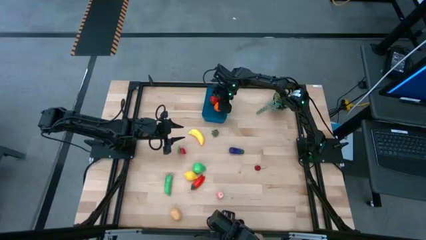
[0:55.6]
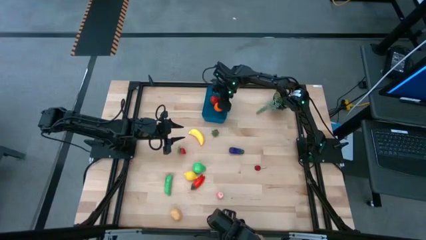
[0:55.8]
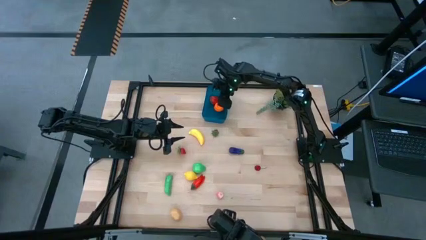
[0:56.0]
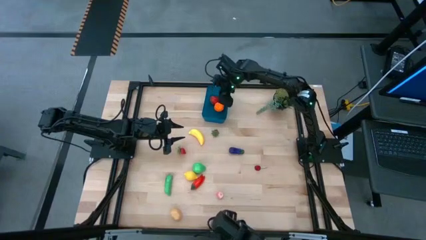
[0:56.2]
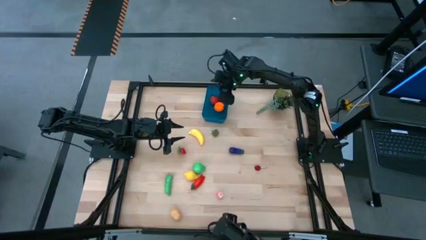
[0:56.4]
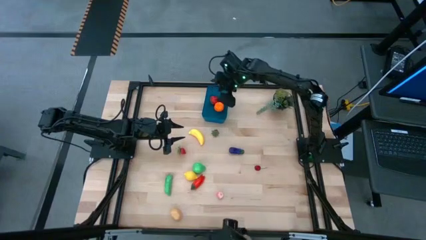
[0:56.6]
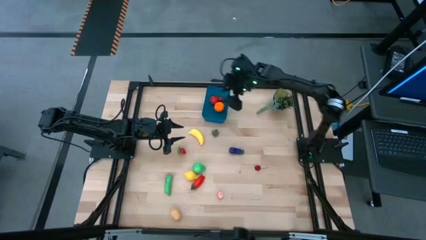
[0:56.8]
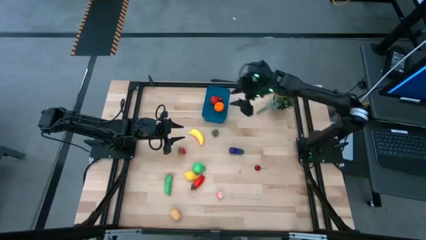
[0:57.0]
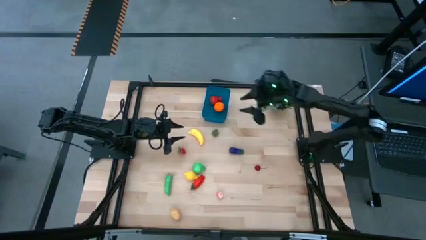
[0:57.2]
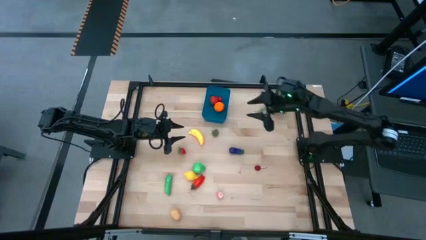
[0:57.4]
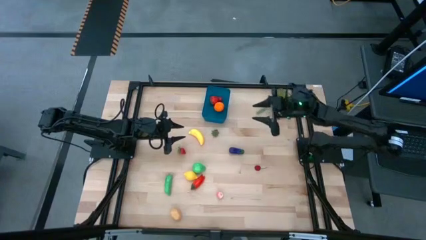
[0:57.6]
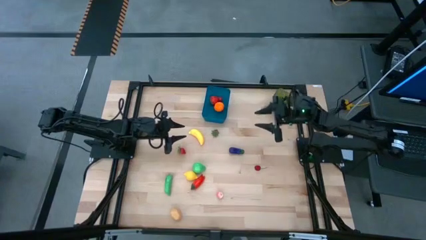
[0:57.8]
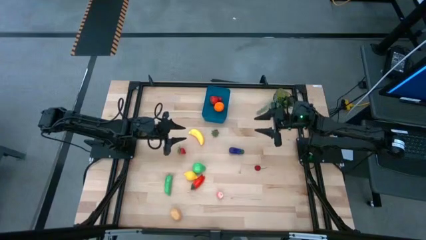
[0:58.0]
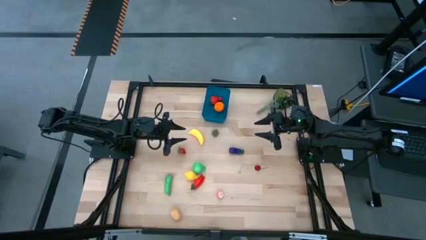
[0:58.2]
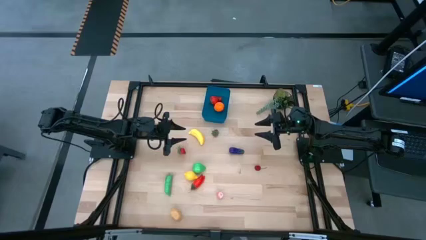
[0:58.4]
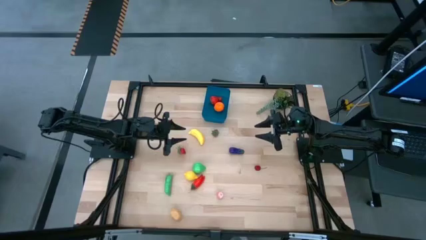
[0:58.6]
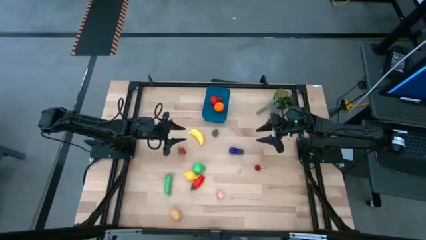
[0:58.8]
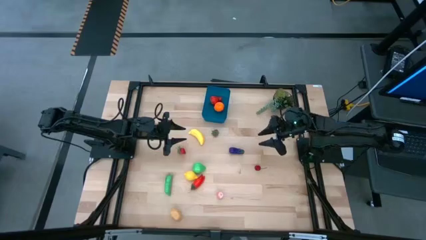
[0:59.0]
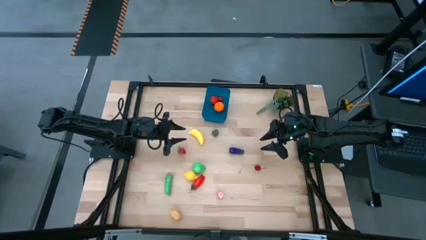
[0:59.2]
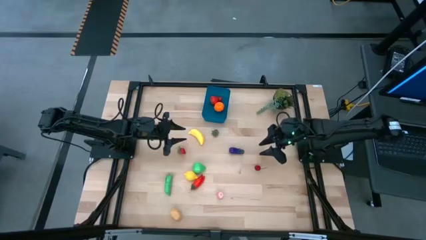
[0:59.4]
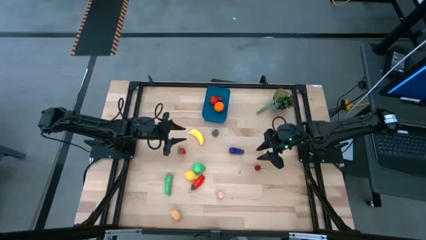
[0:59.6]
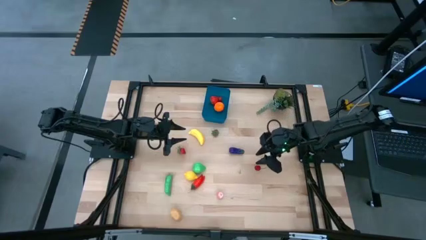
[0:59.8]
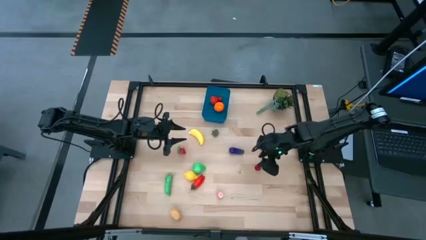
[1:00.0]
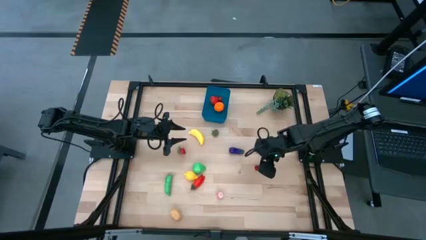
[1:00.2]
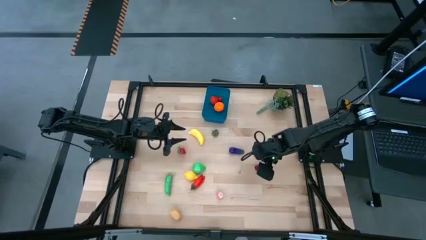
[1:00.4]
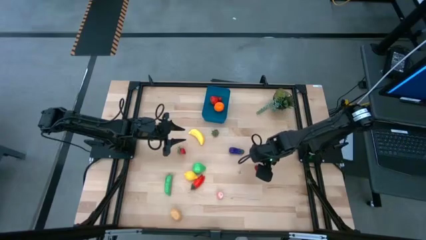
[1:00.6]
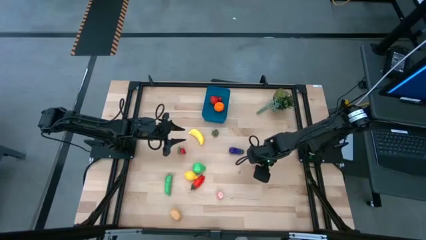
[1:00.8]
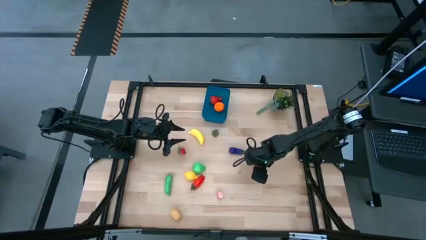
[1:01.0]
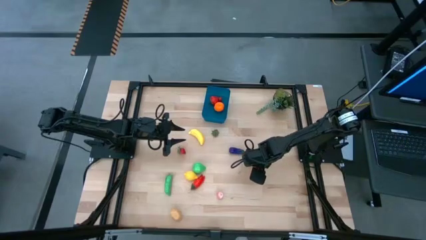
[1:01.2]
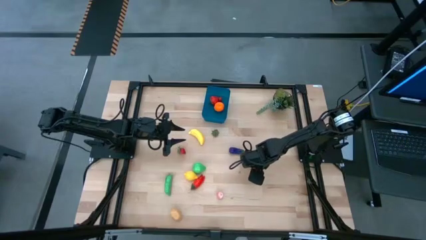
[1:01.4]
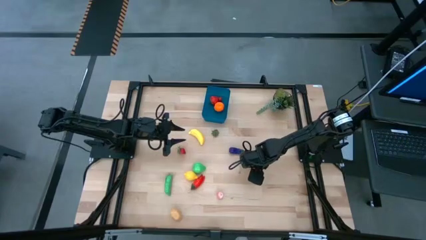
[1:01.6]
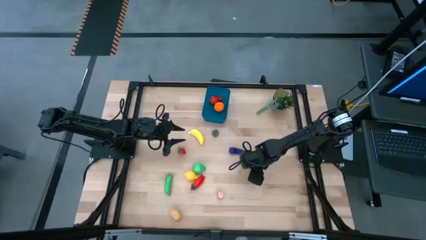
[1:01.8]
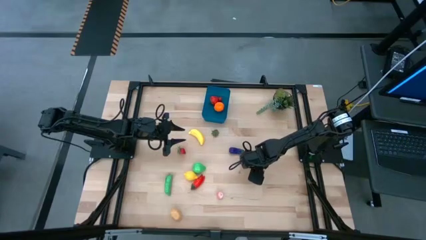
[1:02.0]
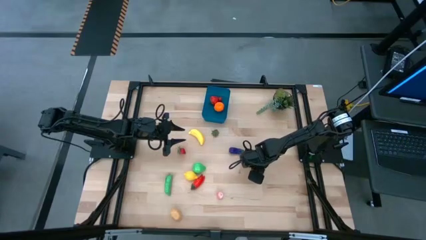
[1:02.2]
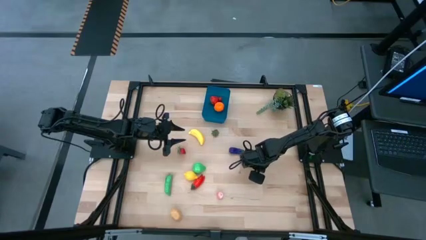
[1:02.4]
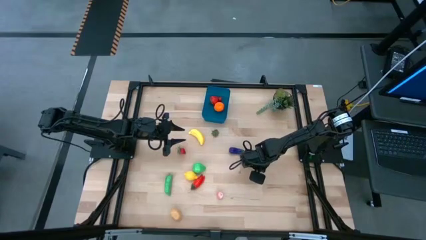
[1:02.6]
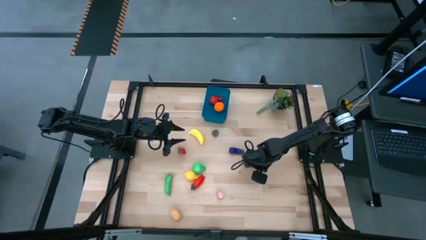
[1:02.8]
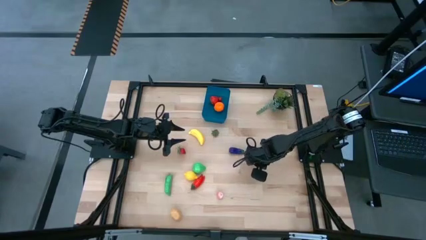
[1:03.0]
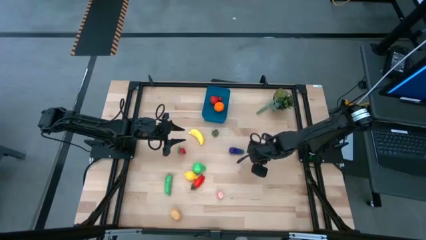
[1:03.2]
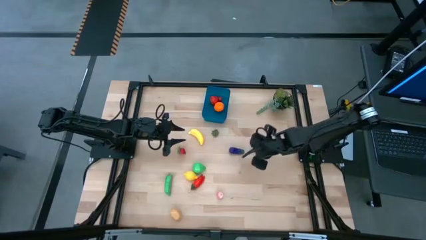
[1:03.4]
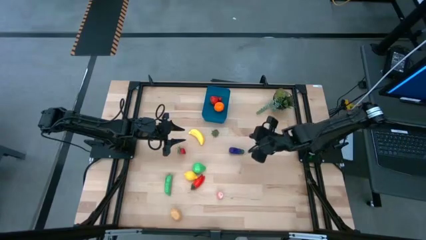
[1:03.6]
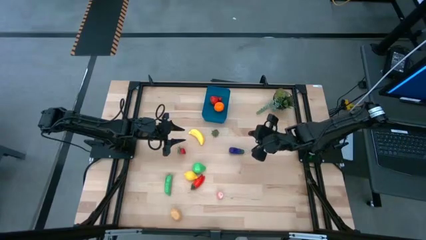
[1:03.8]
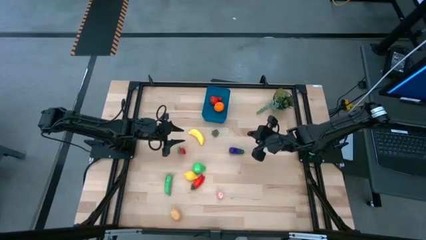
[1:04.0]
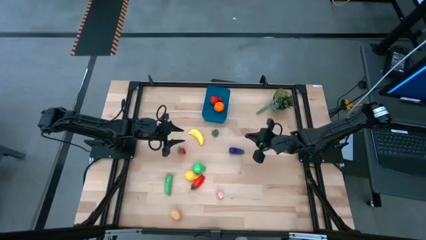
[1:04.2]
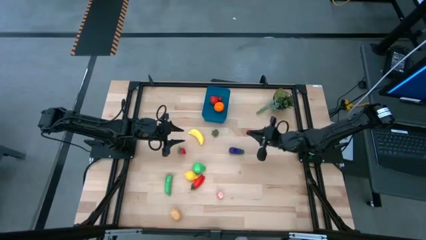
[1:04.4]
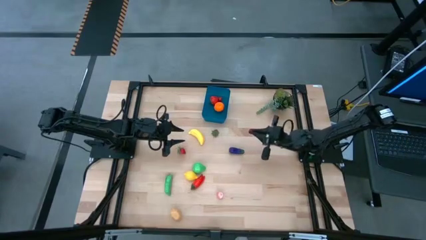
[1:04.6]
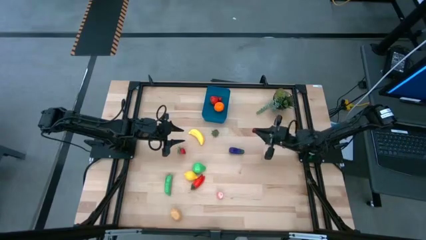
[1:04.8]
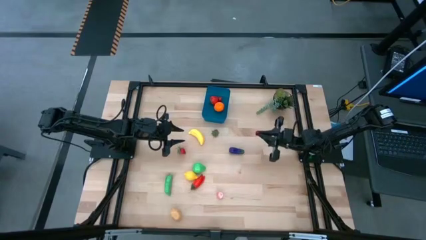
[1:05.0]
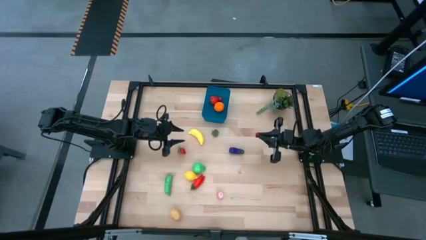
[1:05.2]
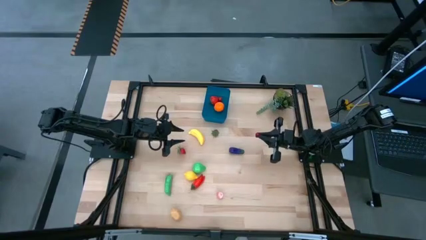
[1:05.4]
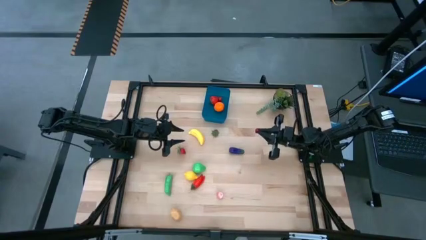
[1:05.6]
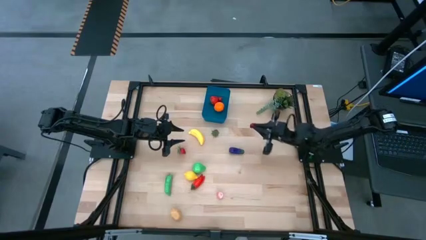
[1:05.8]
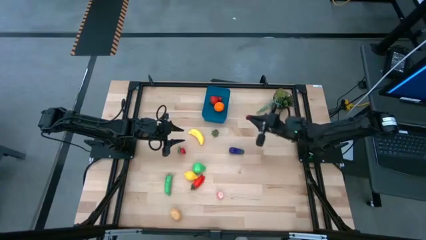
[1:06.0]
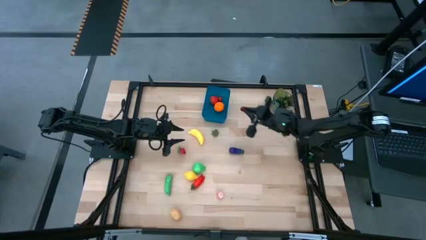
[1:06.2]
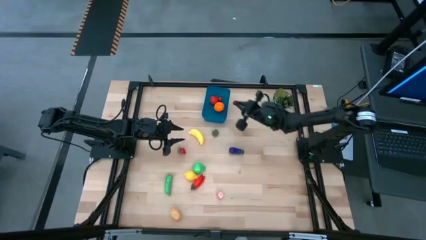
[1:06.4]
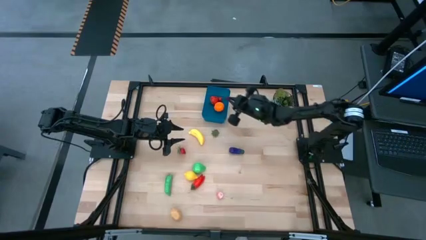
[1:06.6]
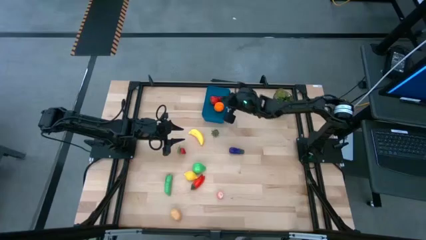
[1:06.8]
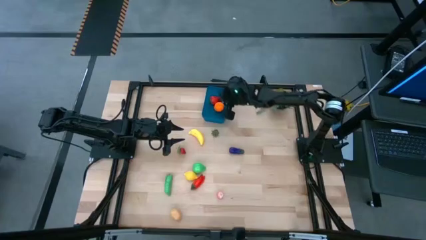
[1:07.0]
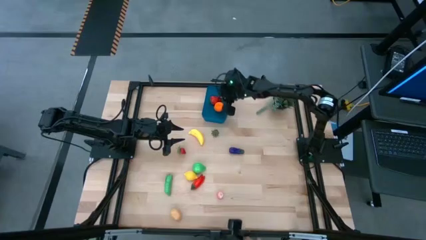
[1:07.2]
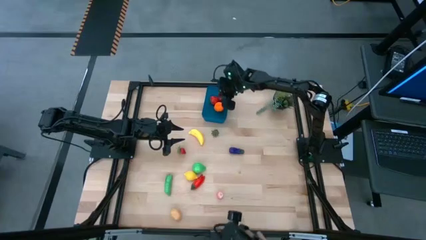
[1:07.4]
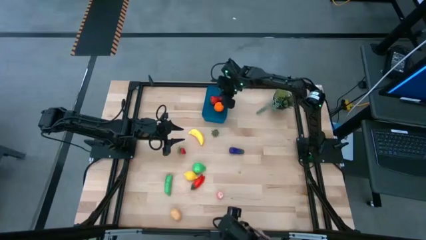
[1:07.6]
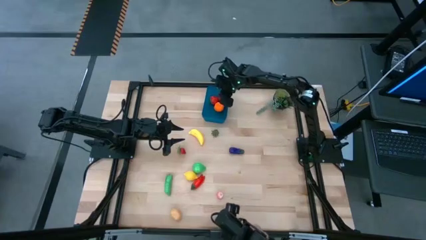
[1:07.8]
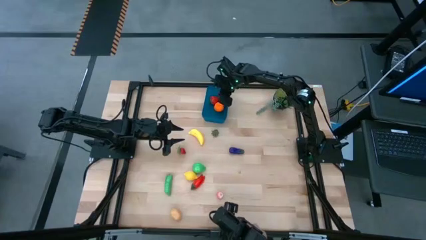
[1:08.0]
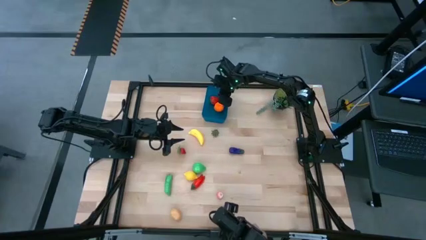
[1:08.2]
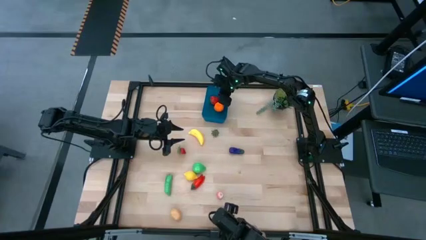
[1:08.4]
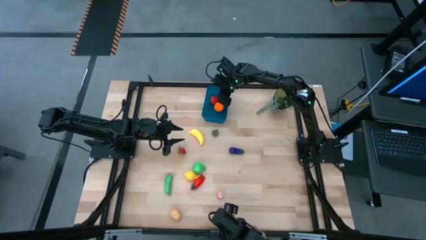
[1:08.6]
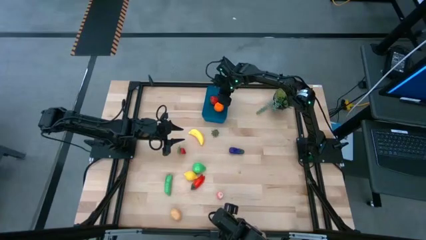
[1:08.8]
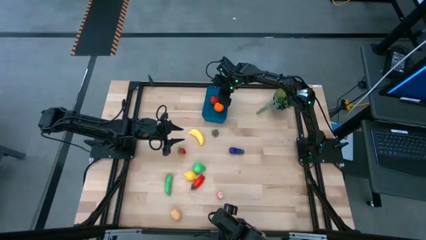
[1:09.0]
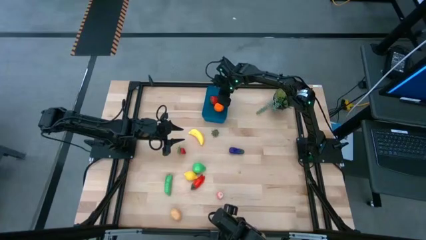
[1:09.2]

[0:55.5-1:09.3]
Task: Pick and placing Produce into tupperware
Put the cherry into the blue bin

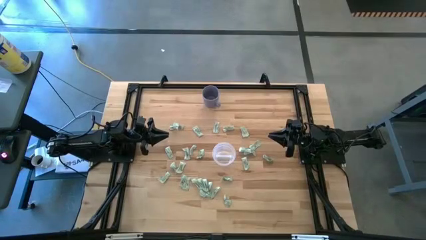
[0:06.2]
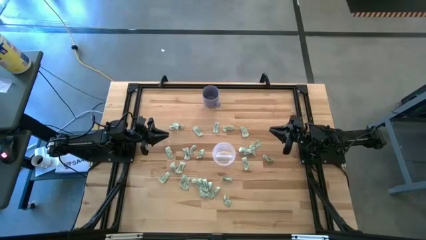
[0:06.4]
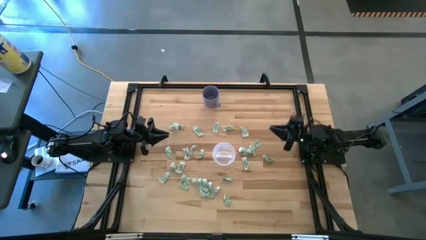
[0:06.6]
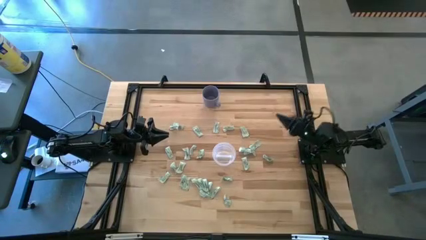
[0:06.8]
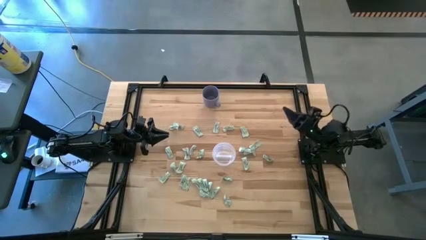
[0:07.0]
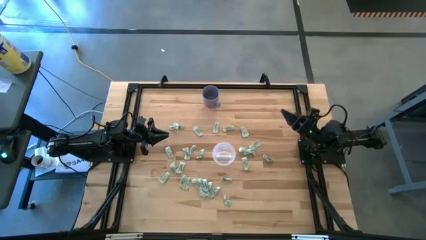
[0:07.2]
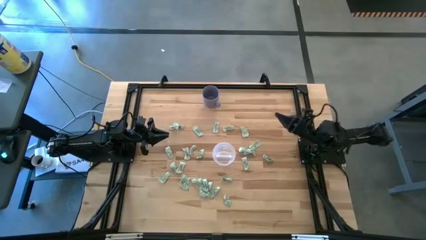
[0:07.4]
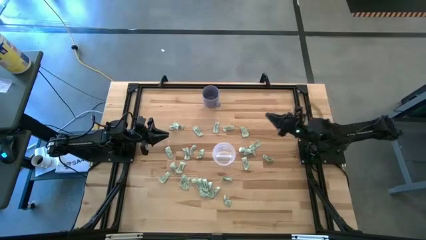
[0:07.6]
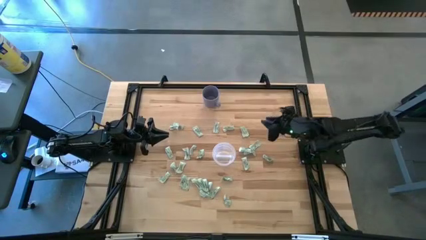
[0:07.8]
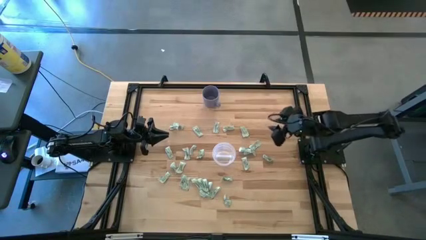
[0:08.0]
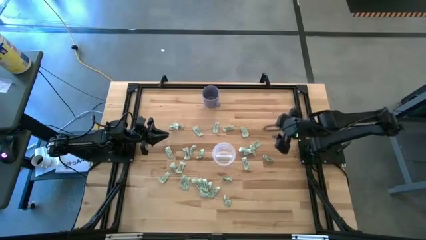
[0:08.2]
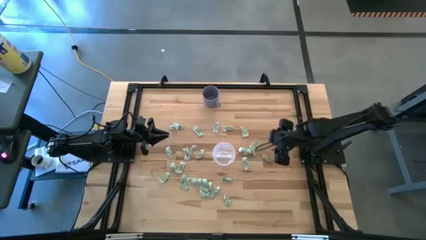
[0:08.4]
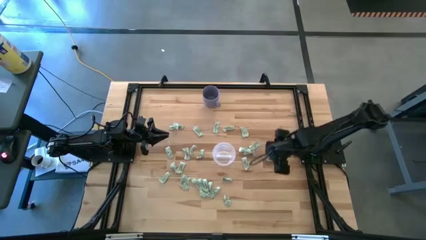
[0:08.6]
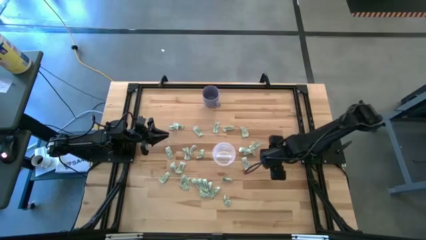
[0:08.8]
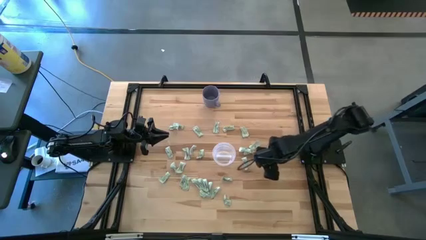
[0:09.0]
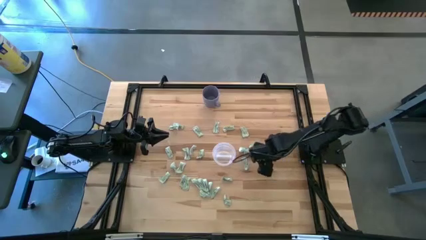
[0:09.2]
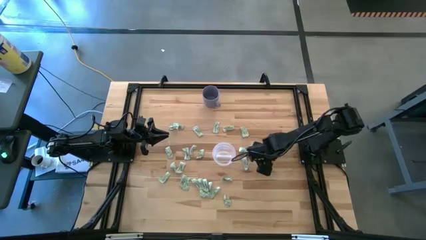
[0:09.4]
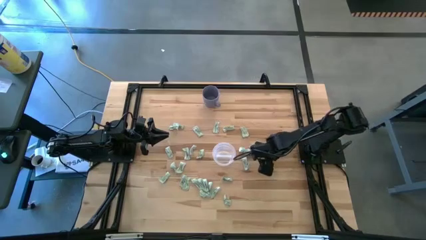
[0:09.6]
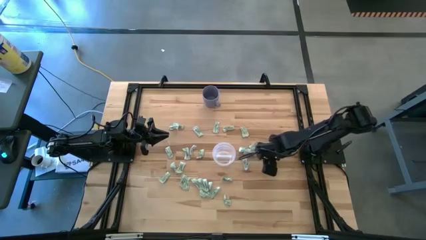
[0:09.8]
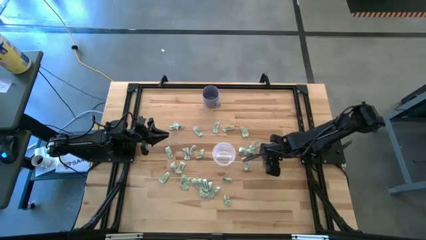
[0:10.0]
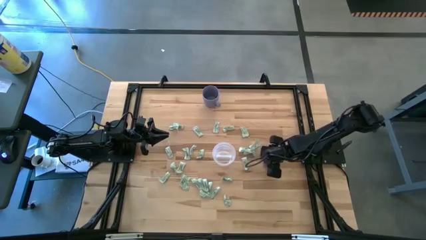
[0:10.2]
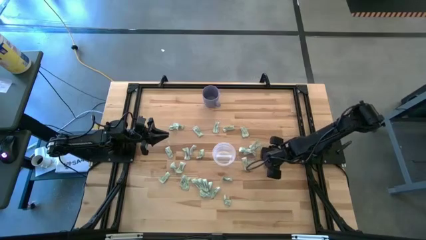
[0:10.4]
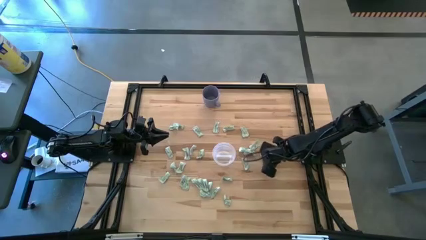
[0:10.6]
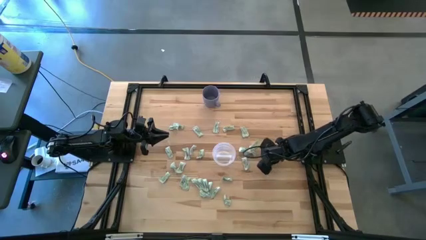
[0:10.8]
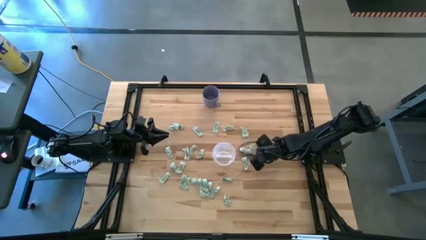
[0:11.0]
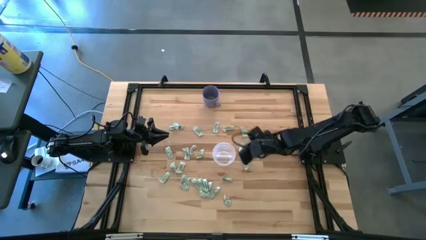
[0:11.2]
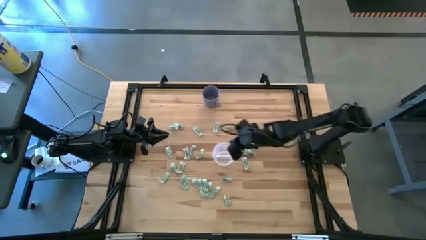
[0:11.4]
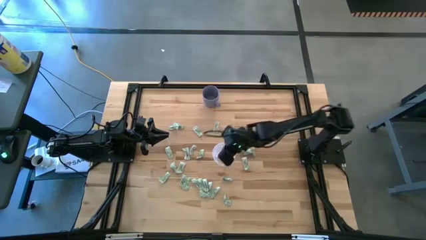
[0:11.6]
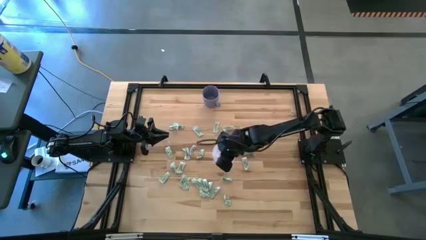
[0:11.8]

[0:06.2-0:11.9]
Task: Pick and place Stevia / Truvia into bins
Put the stevia packet into the transparent container
